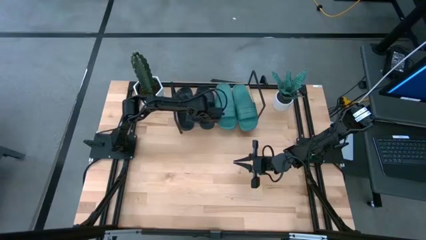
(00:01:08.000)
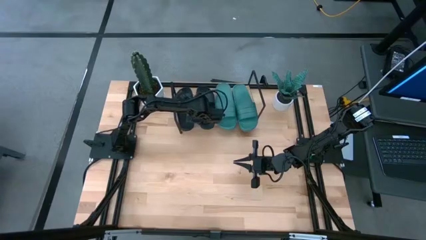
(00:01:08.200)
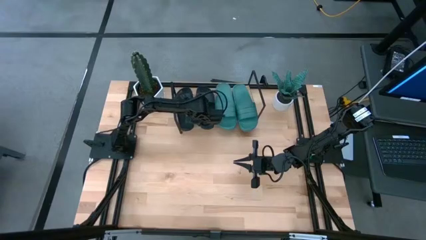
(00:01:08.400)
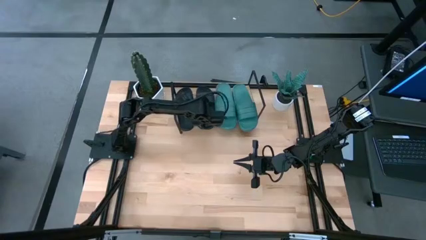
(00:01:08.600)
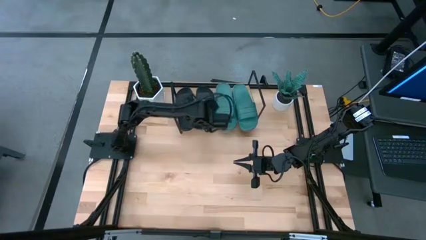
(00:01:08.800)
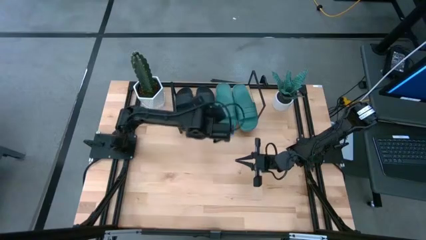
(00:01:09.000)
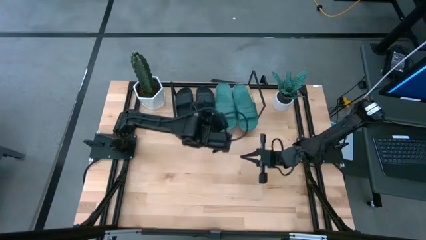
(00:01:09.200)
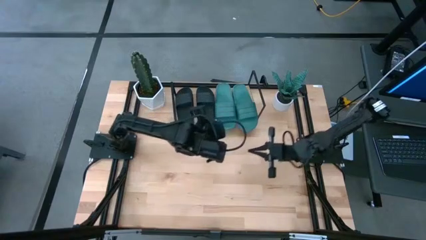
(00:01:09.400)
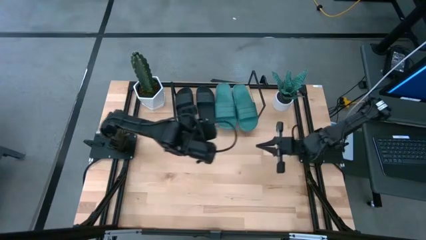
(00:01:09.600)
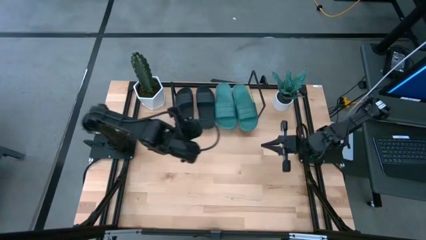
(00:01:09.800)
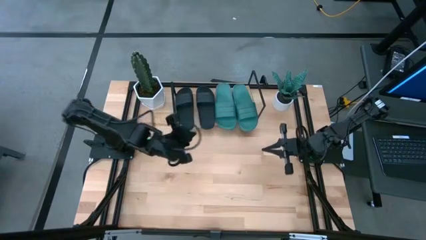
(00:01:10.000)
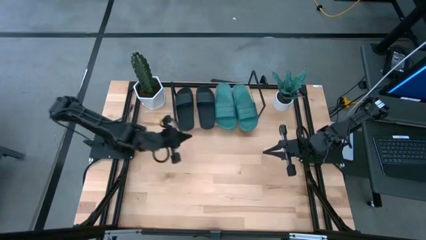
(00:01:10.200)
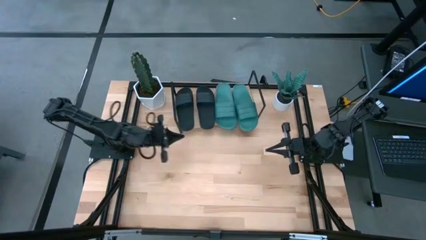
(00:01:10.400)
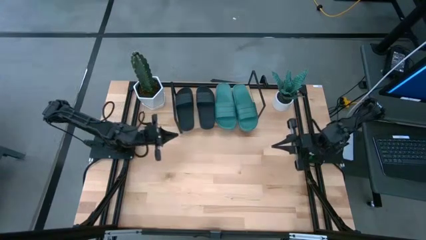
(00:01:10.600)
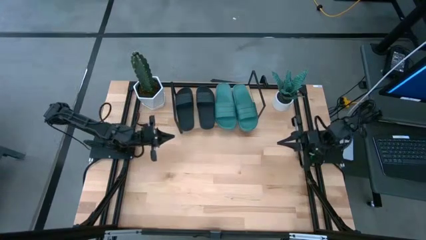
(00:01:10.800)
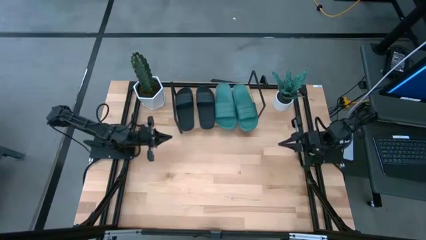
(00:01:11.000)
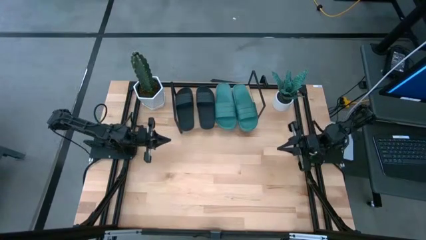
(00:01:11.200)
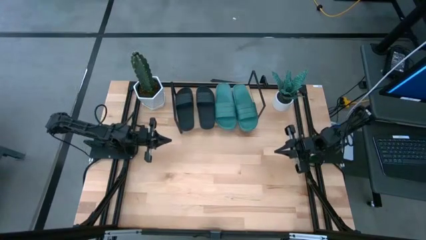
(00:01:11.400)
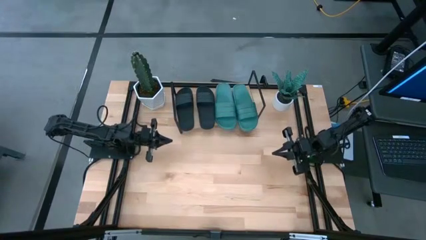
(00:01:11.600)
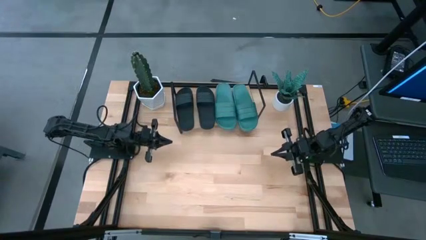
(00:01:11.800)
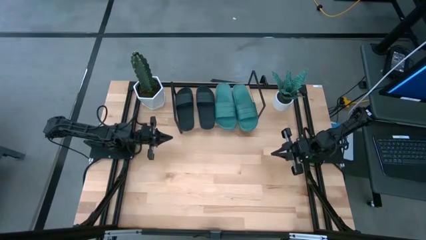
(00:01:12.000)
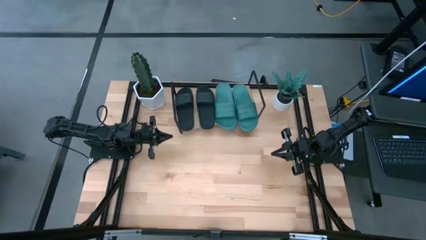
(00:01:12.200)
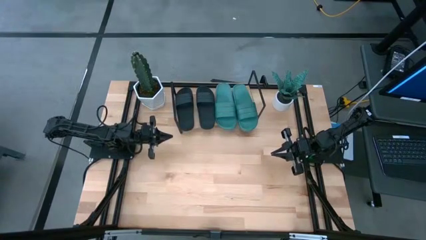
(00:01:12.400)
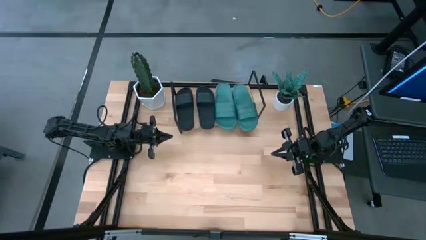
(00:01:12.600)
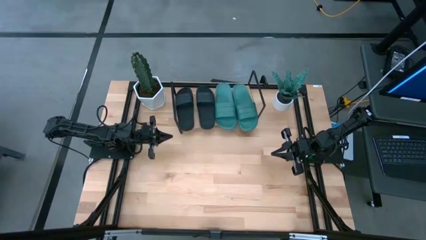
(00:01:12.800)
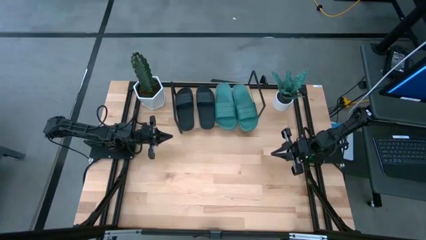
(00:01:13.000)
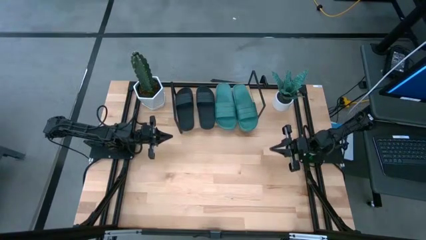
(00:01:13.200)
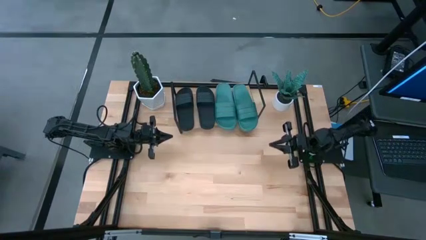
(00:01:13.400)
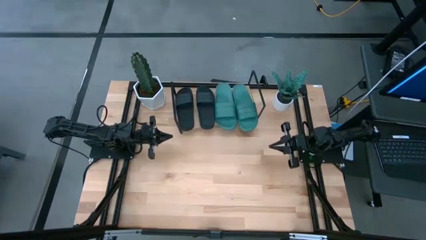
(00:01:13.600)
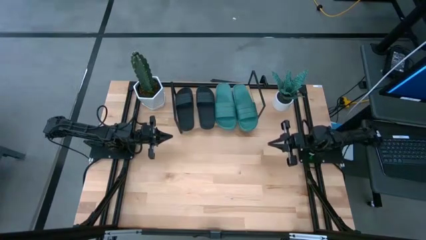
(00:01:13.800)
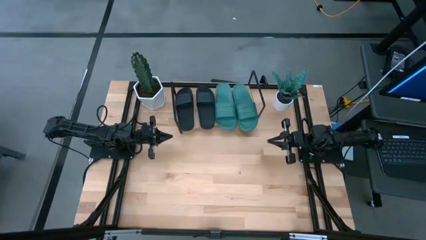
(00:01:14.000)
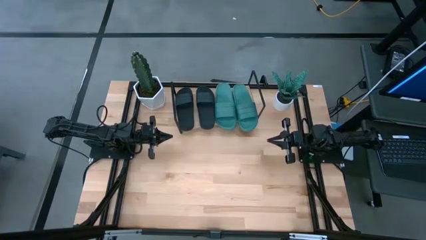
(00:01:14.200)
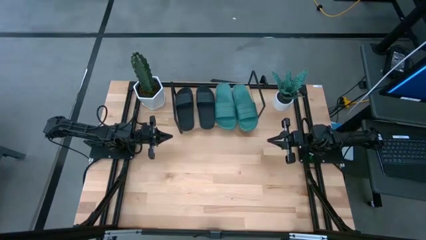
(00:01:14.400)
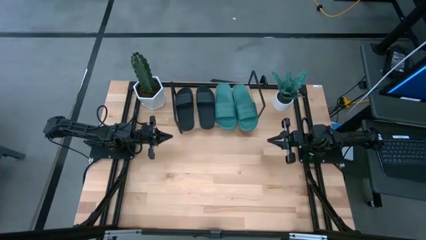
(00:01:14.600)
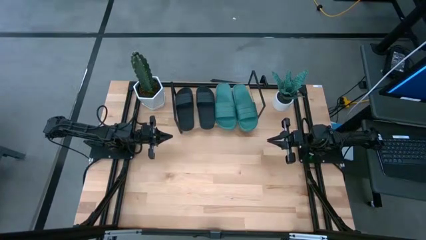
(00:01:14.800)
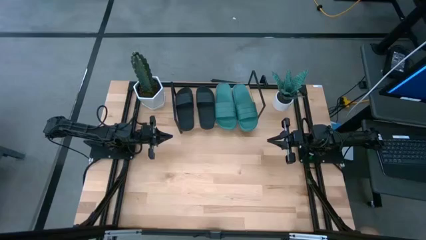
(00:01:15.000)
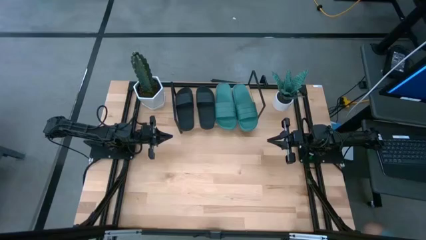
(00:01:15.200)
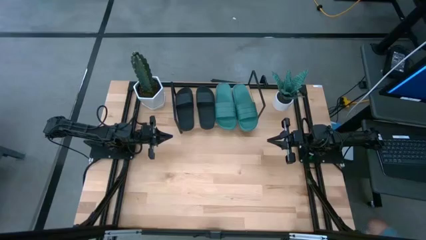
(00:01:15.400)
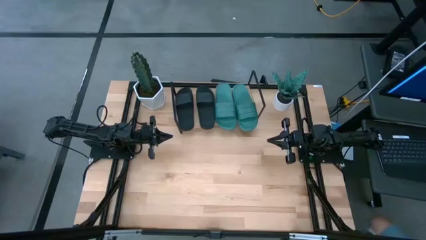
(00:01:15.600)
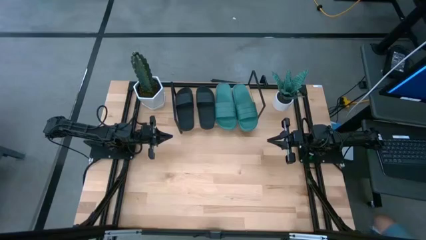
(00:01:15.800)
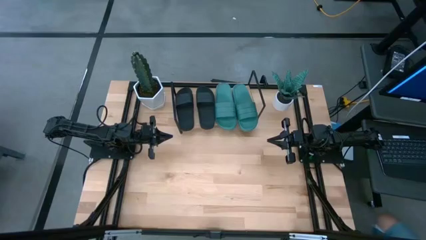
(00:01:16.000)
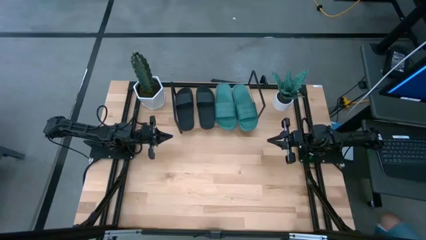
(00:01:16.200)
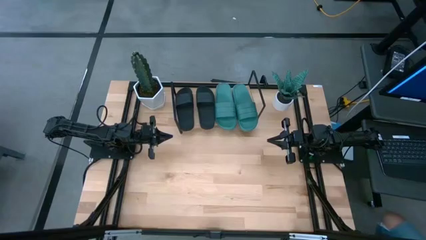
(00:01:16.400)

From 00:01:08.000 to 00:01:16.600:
Task: Pick and place slides into the shelf
Return to Home Position

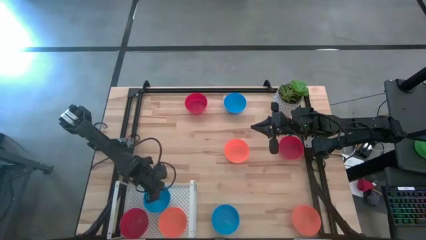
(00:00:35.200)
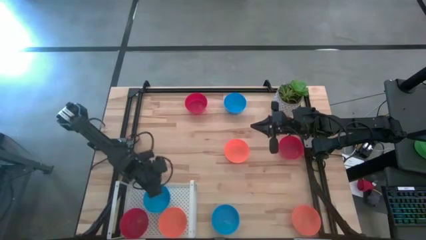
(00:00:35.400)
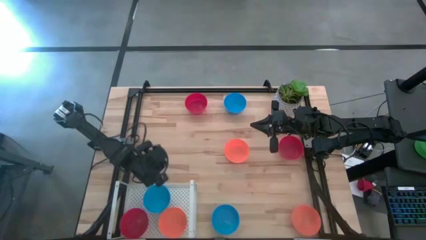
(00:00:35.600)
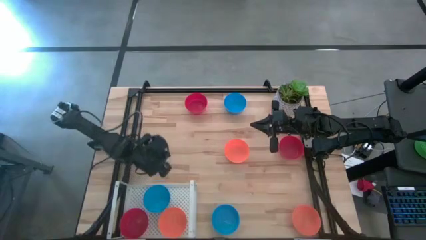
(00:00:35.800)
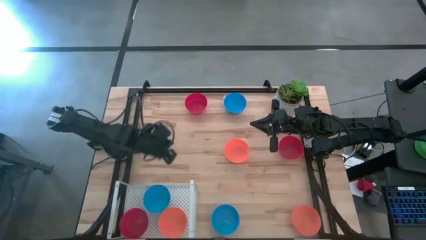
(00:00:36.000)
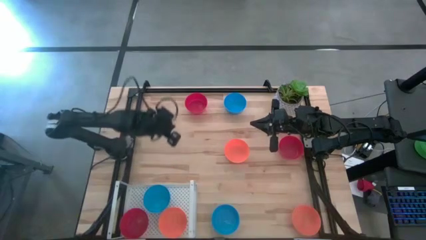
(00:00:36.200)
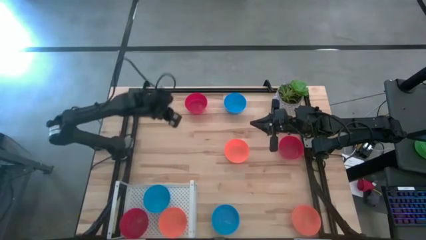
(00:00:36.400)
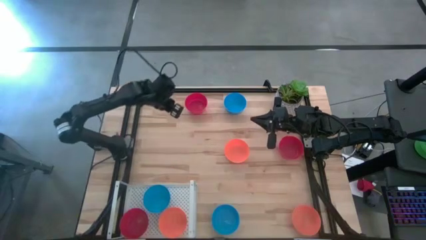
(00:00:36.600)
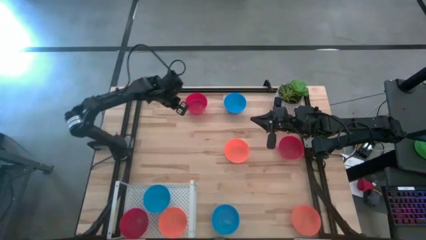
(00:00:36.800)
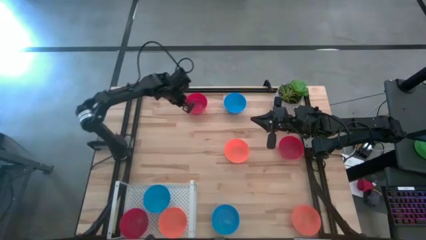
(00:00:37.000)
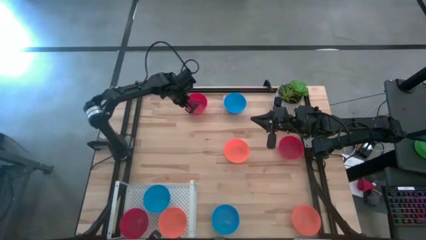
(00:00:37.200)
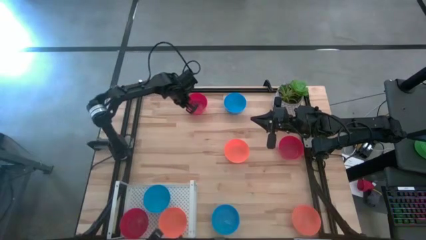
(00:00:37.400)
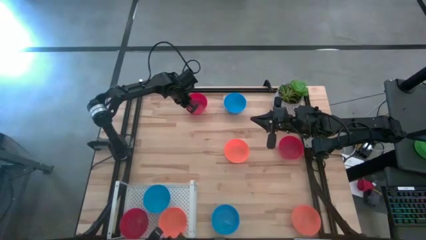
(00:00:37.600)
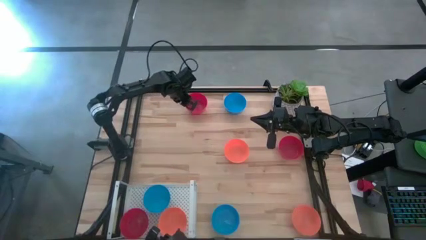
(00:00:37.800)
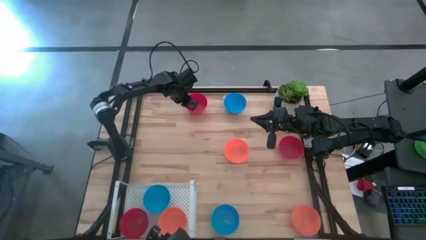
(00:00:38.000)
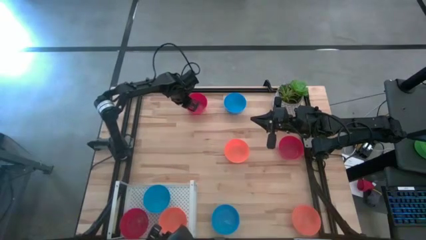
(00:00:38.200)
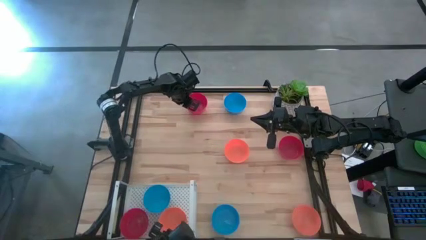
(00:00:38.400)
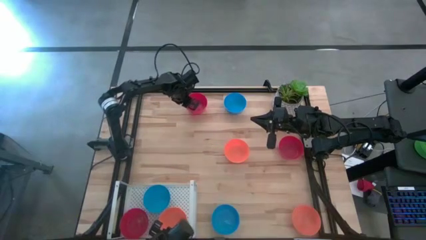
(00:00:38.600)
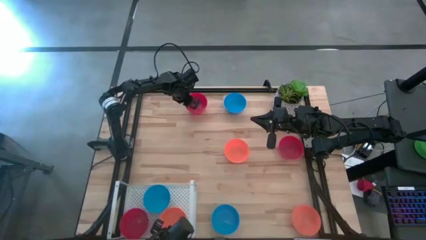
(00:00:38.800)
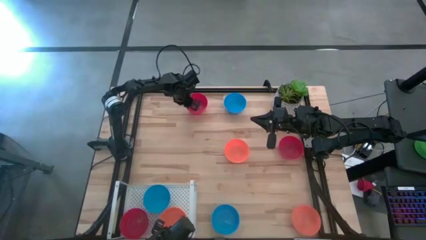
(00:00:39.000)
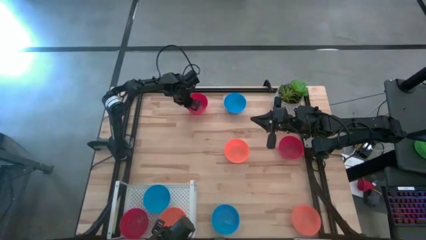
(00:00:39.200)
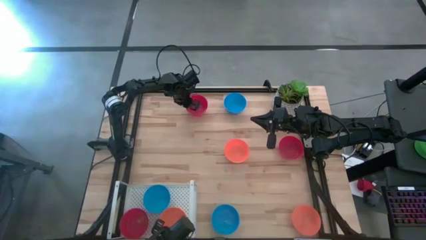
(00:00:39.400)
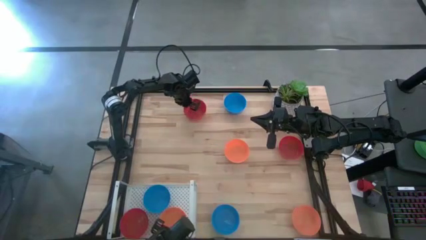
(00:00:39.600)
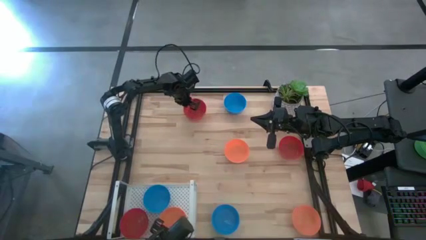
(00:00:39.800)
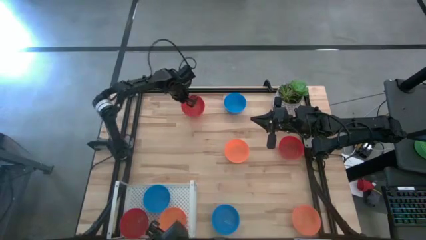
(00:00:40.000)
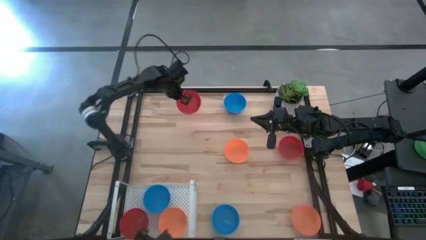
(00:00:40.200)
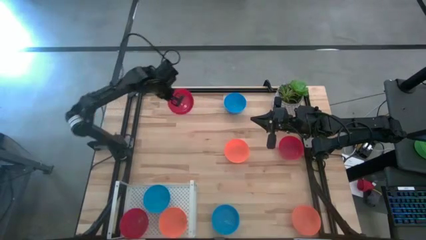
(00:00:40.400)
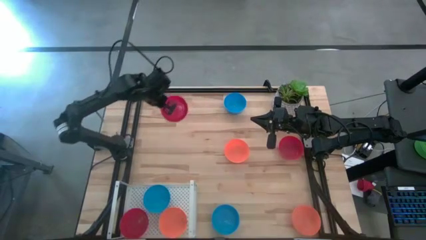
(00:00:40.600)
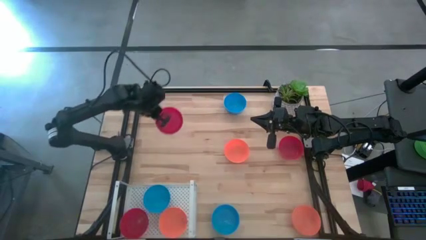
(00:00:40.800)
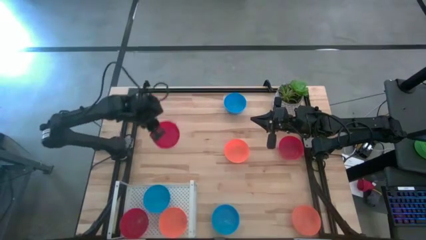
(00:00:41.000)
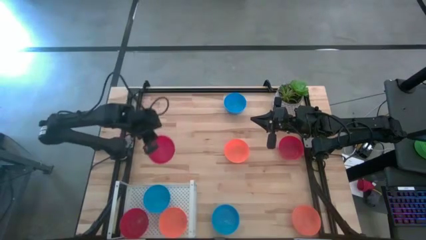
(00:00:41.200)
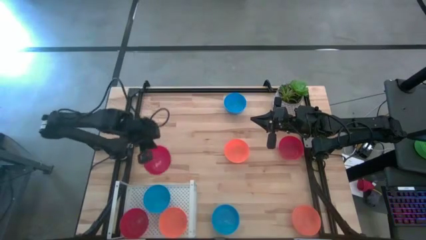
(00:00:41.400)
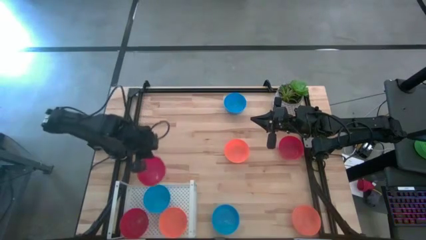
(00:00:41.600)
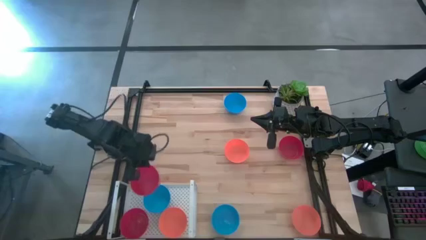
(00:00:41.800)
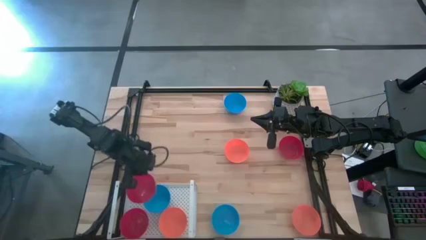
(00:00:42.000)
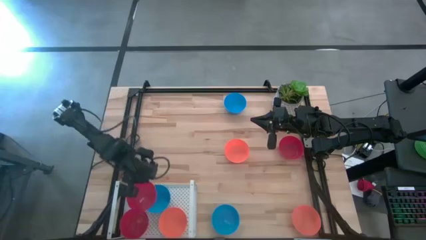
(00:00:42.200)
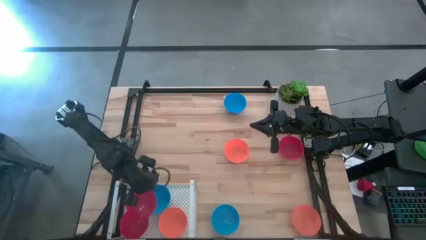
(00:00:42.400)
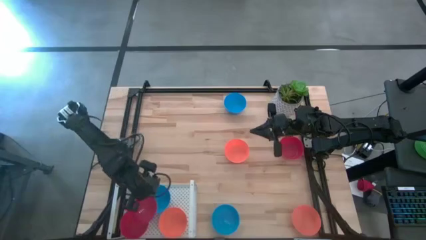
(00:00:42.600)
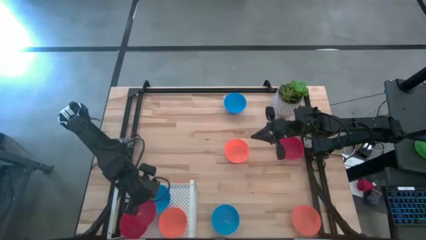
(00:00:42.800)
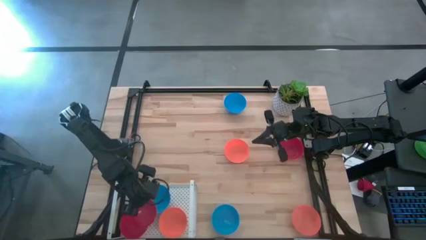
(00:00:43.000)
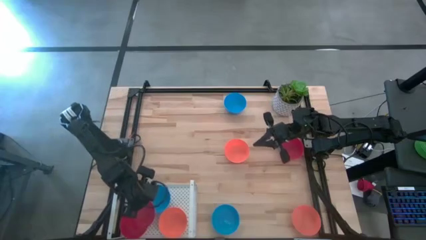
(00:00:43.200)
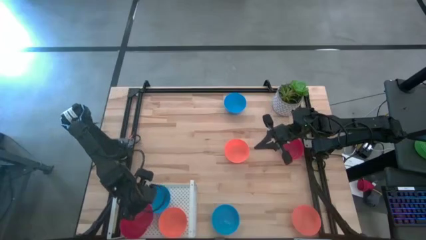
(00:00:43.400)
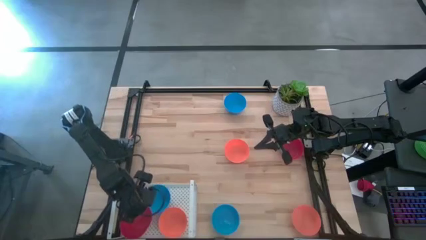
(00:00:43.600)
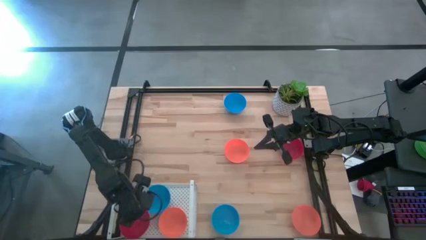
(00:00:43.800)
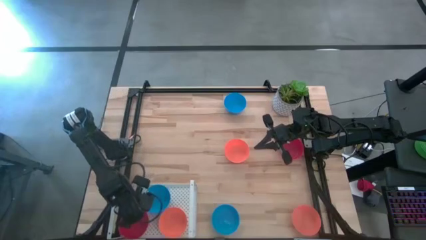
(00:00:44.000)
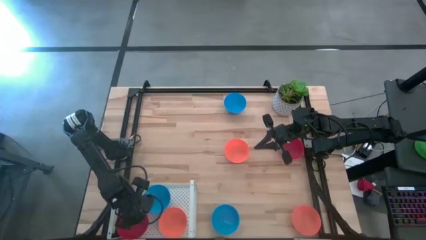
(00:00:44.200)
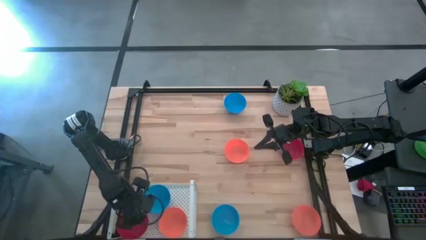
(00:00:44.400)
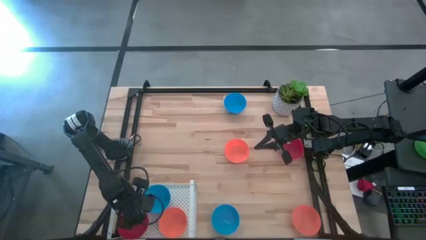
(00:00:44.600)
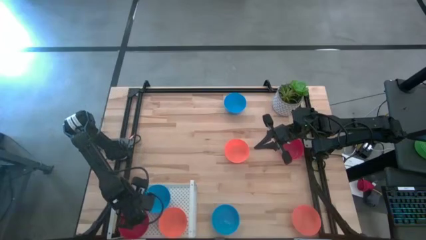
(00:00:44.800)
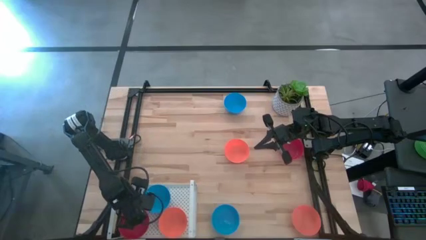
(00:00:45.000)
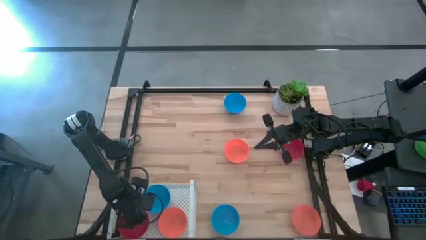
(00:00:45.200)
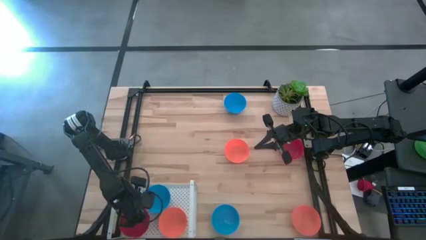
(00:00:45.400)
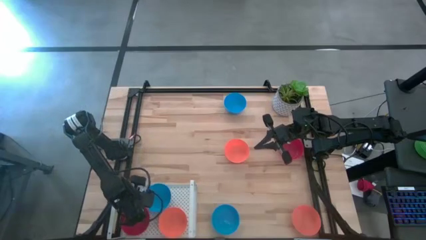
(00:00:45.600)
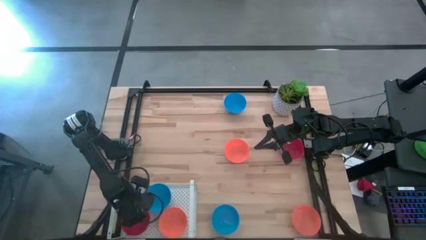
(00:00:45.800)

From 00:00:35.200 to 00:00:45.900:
Task: Pick & Place Mini bowls
Stack the top red bowl on top of the red bowl on the shelf
